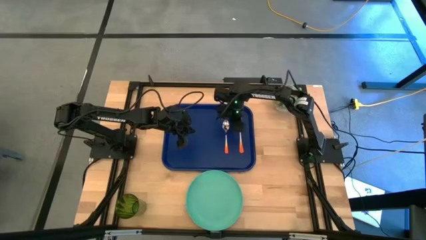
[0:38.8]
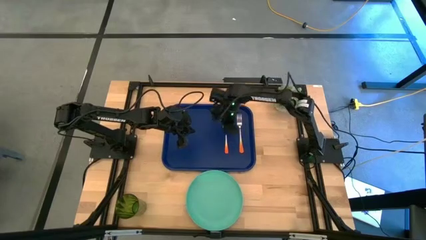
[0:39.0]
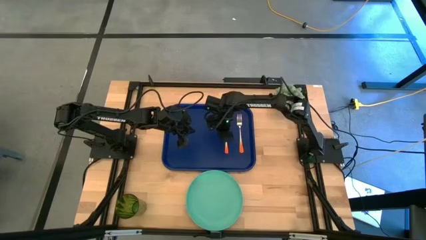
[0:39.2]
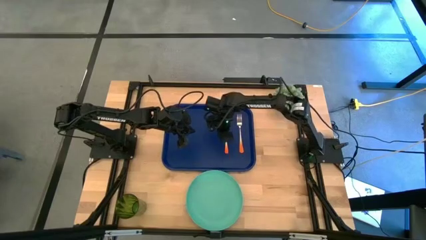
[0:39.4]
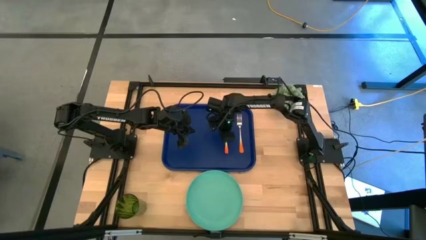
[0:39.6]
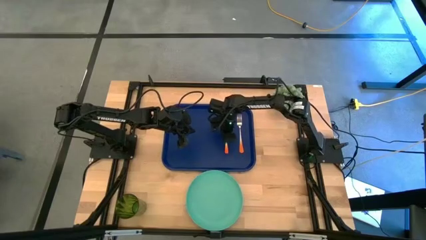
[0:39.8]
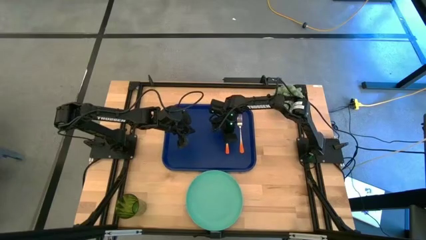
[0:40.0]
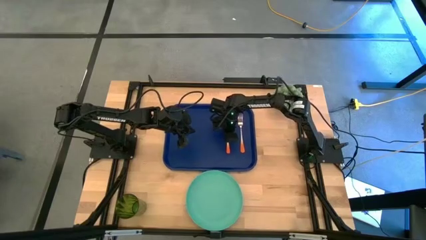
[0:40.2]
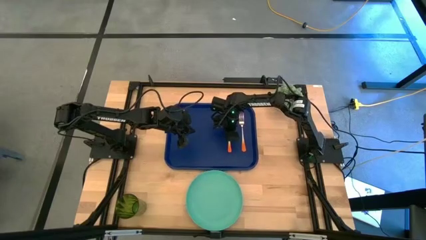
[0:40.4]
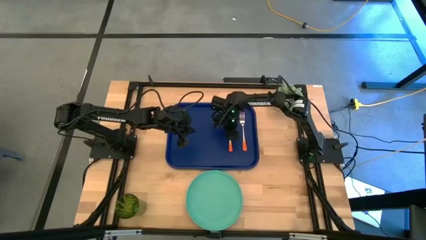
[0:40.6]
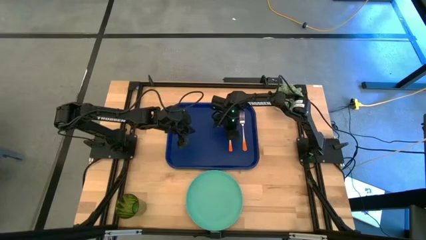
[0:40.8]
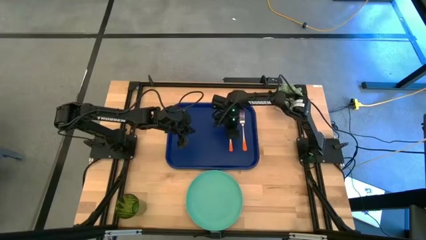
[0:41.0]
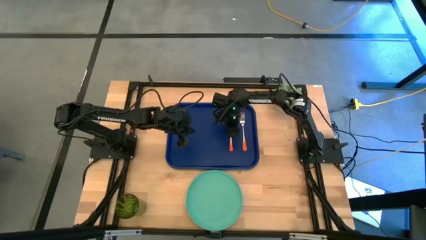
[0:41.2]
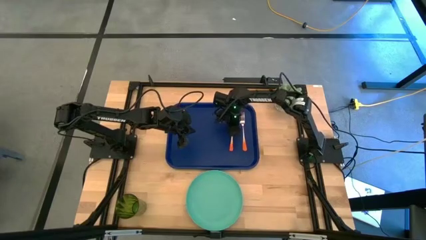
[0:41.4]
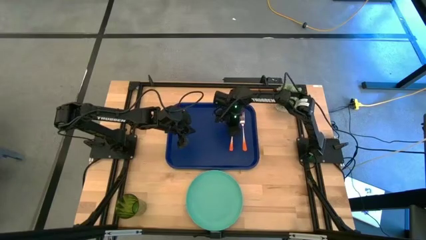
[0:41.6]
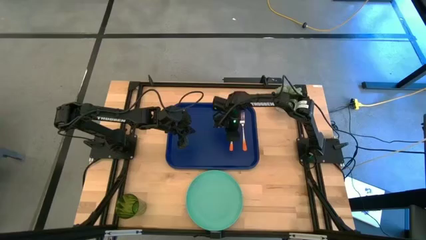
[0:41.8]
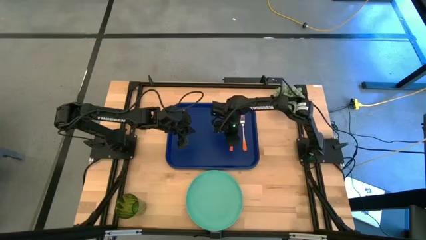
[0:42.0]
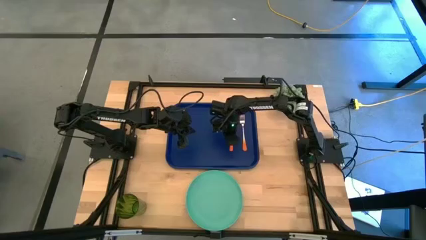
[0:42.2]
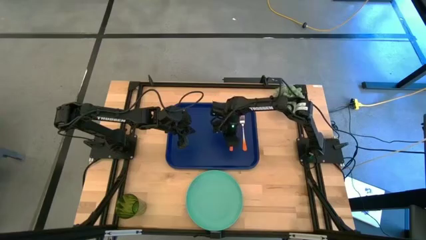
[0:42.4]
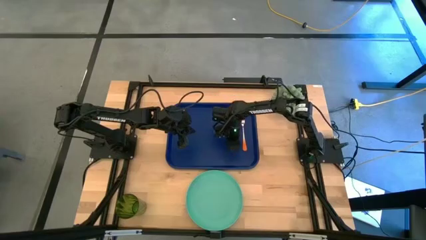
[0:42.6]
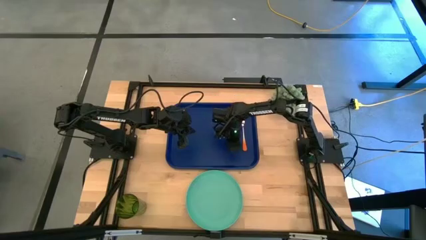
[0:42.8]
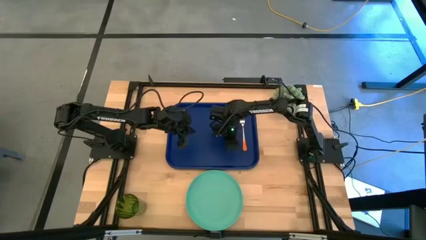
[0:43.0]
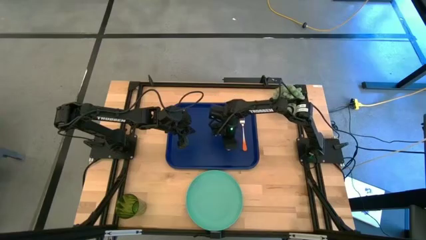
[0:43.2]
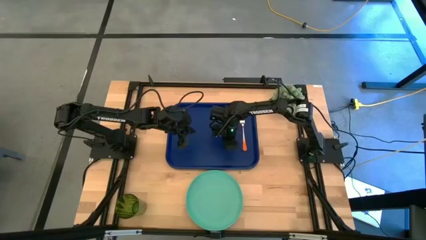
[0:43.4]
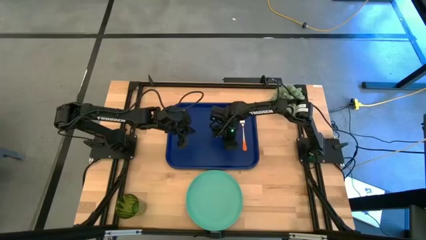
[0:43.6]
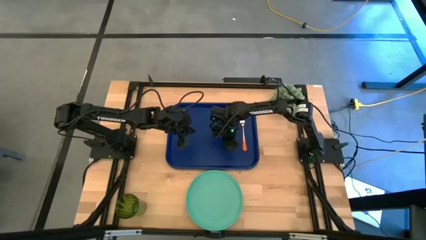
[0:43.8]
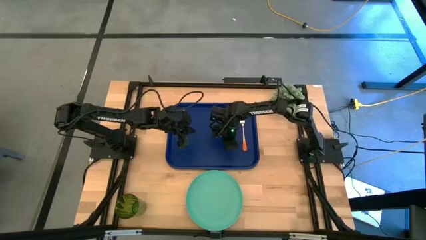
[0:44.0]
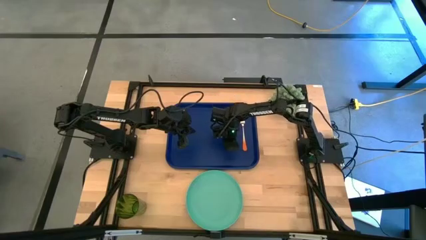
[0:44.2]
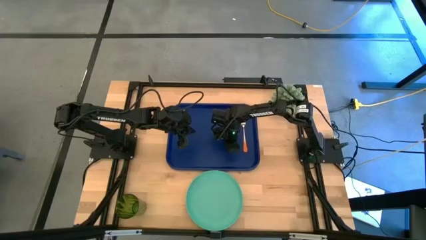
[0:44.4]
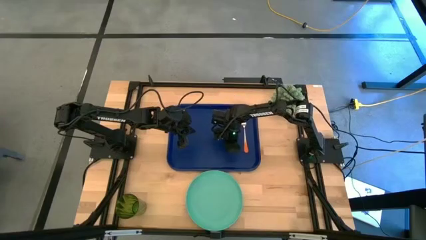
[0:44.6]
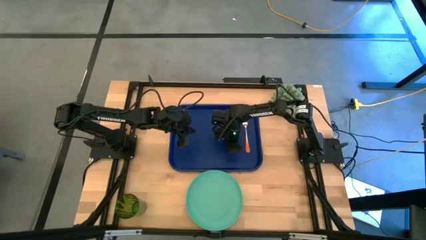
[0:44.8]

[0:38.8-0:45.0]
Task: Pick and place plate/cup/fork/spoon on tray
Adjust the orange spoon on the blue serving tray

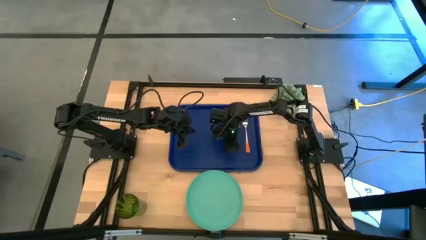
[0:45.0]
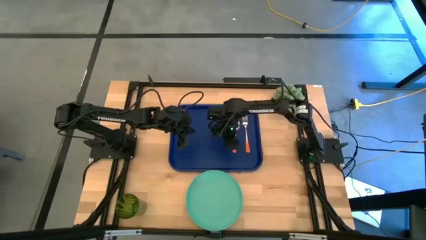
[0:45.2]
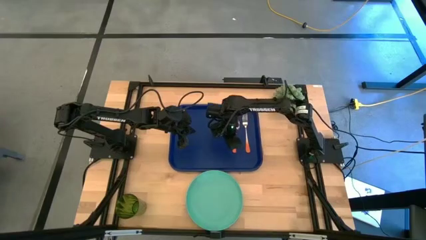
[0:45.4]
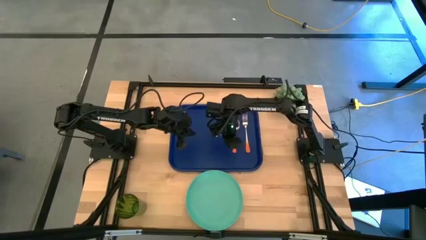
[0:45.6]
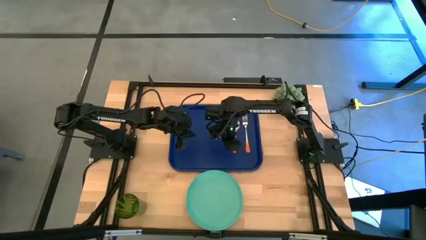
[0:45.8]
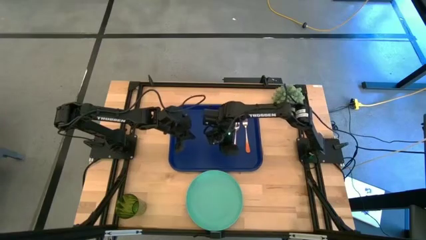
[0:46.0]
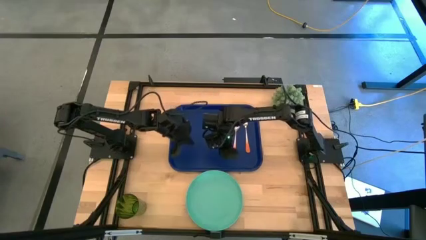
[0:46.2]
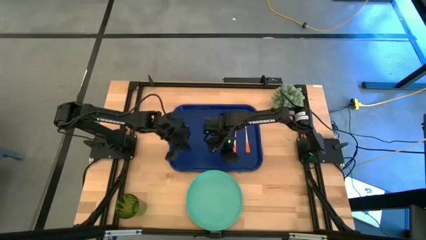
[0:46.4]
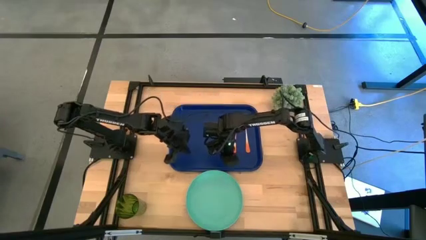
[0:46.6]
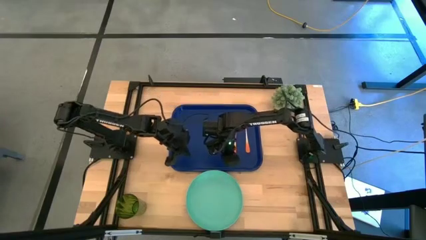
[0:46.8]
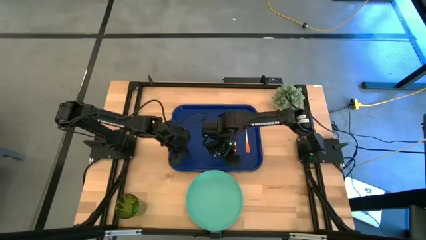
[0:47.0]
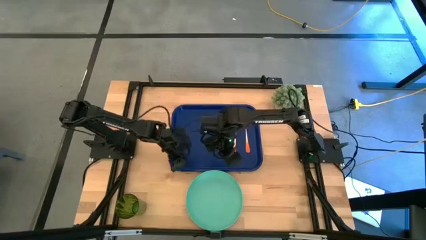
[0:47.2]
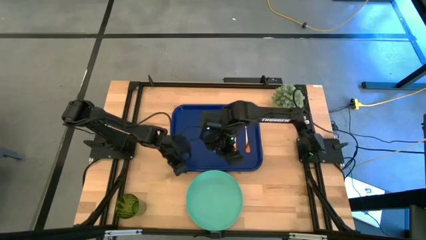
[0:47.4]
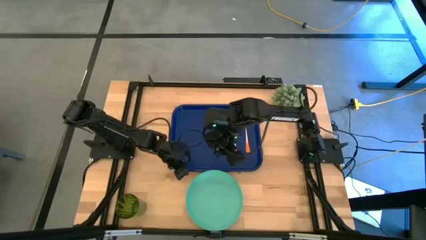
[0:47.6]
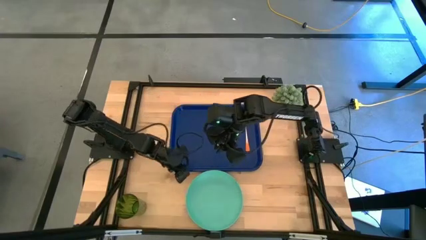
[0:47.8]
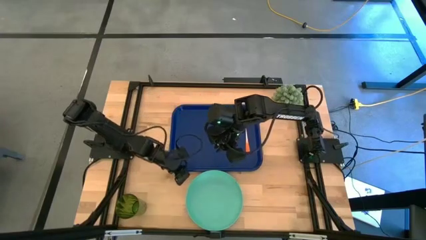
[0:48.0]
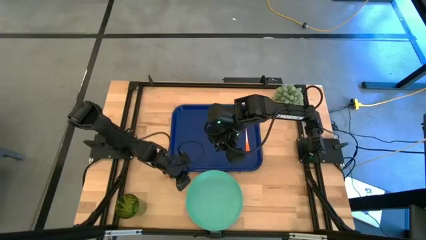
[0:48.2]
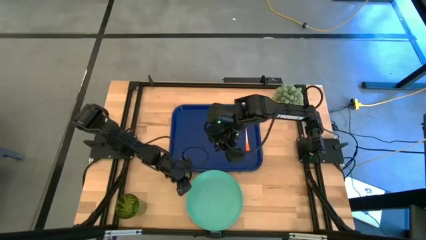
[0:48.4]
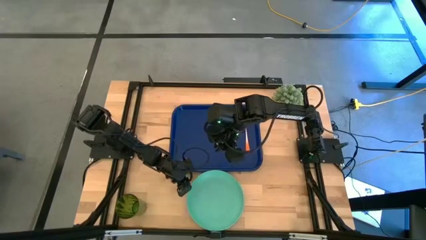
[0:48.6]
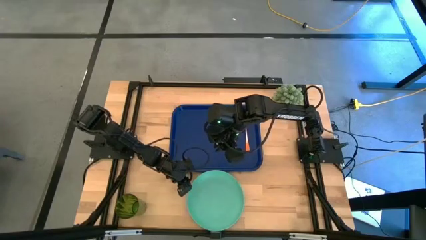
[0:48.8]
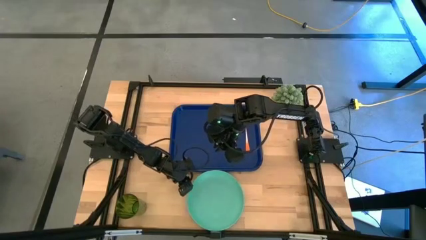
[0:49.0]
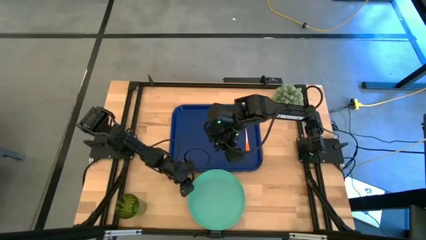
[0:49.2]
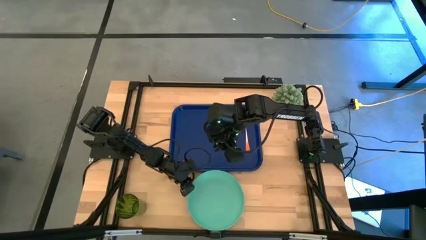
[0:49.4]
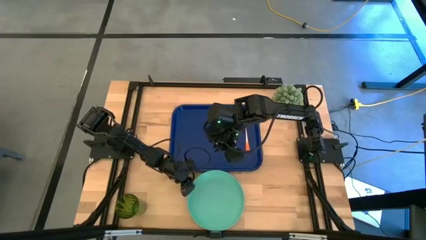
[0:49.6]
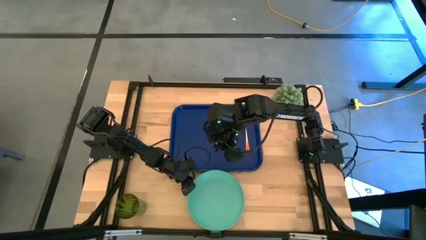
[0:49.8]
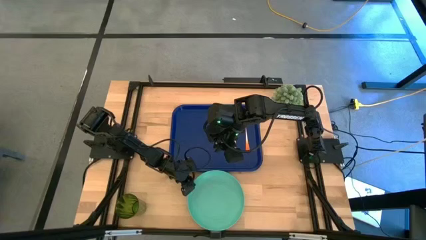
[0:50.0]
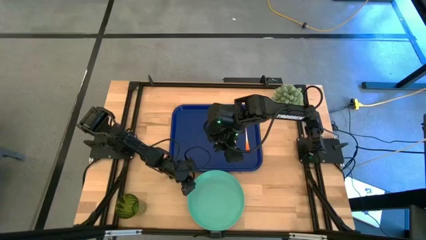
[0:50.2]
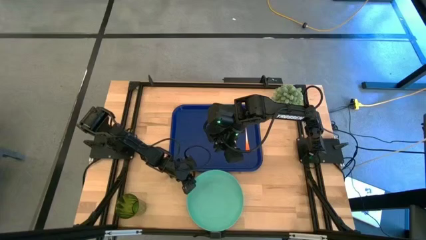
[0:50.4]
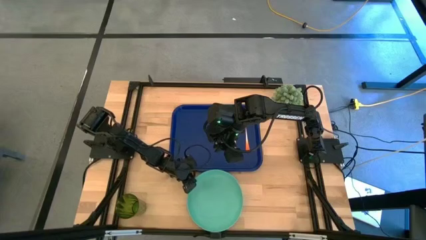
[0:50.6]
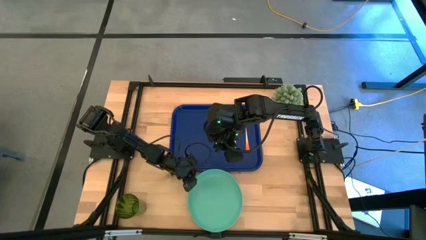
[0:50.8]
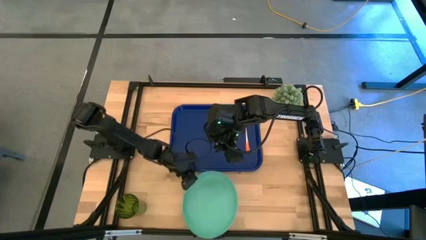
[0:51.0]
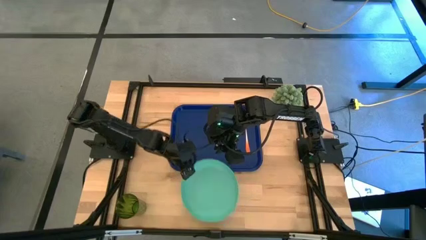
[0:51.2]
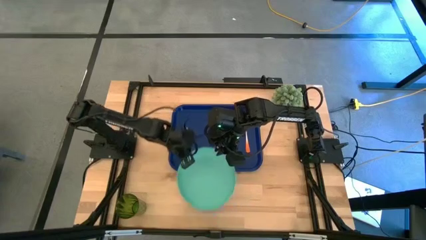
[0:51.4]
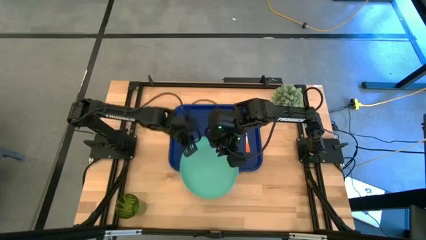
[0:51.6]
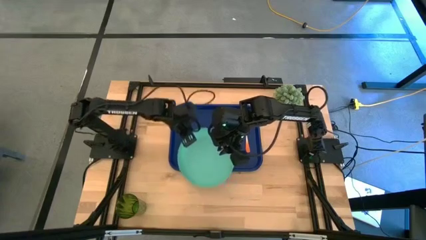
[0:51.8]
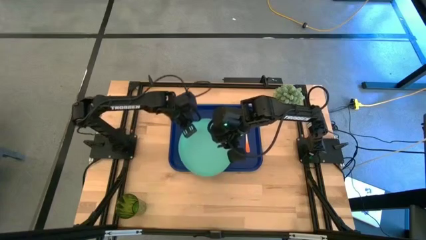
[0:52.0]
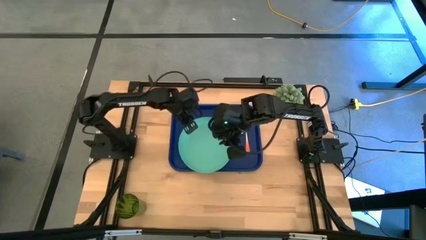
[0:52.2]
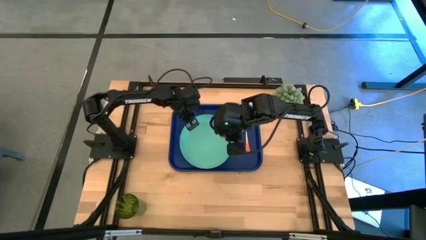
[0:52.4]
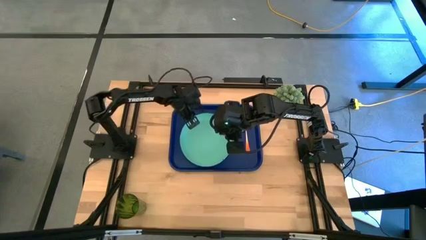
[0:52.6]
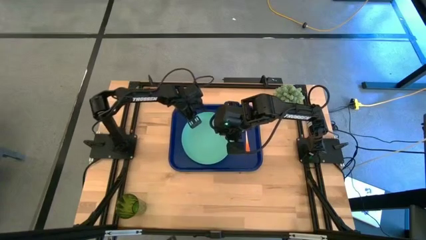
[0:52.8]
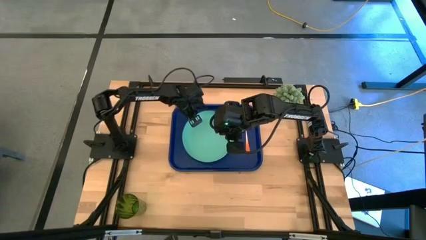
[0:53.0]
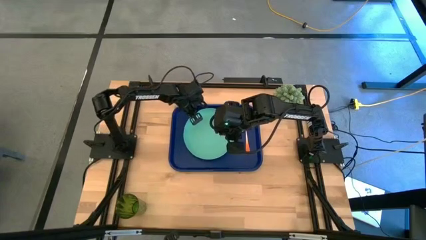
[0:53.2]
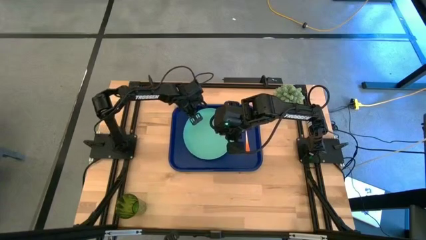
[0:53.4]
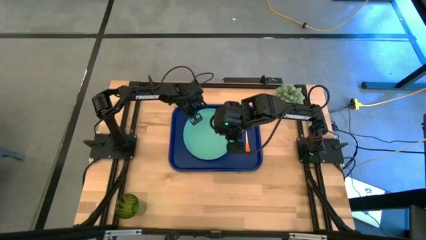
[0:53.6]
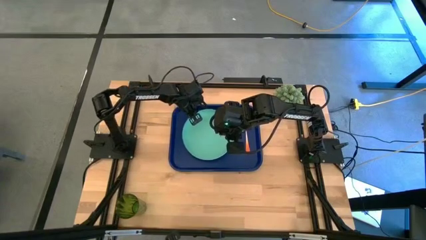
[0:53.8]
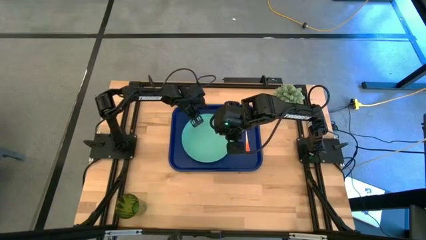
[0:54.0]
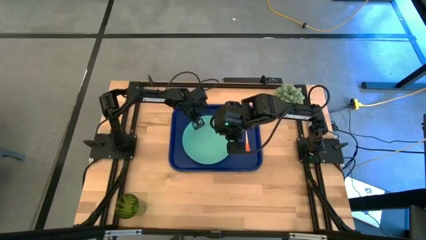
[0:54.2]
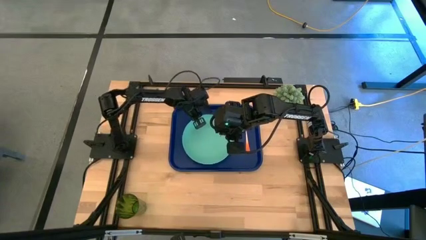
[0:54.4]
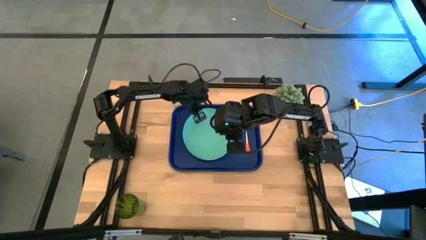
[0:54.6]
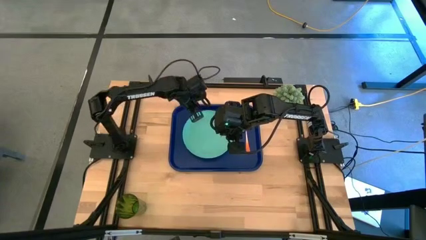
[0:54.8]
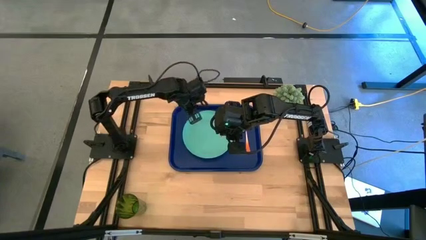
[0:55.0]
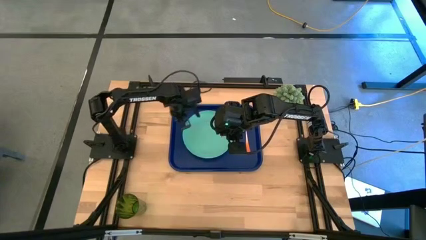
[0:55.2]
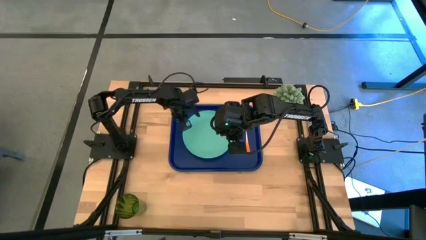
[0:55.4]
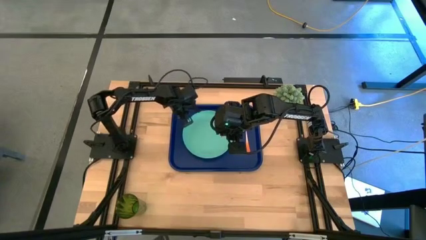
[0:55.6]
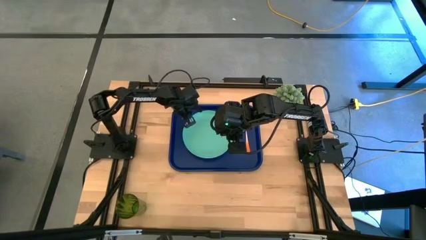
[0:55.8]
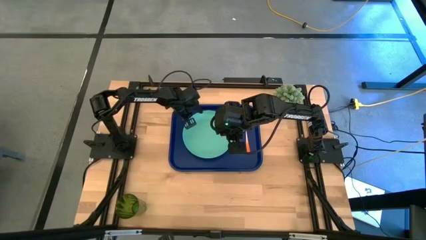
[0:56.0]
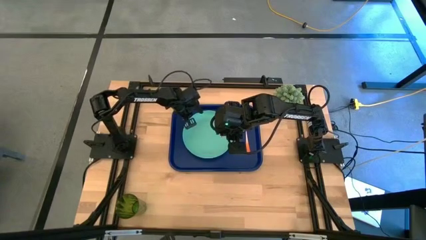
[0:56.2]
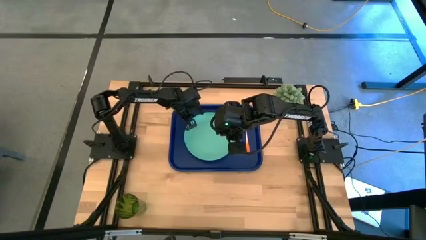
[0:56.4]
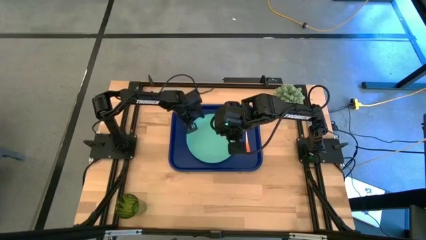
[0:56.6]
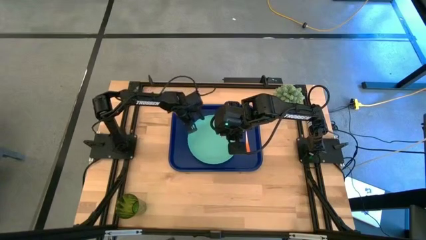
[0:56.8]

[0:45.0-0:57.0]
Put the blue plate on the blue serving tray
